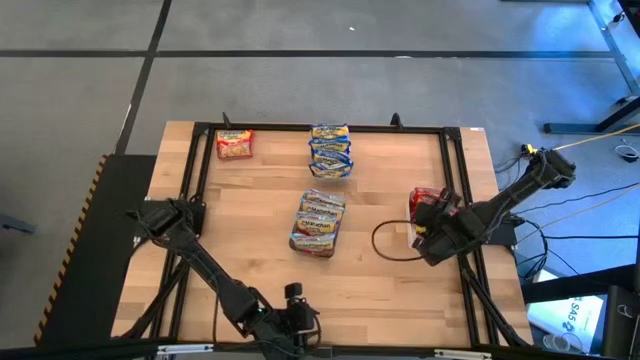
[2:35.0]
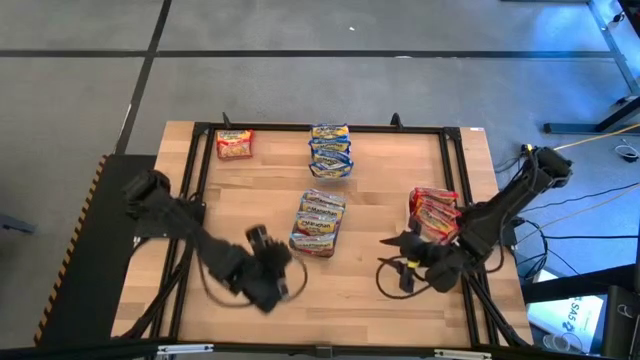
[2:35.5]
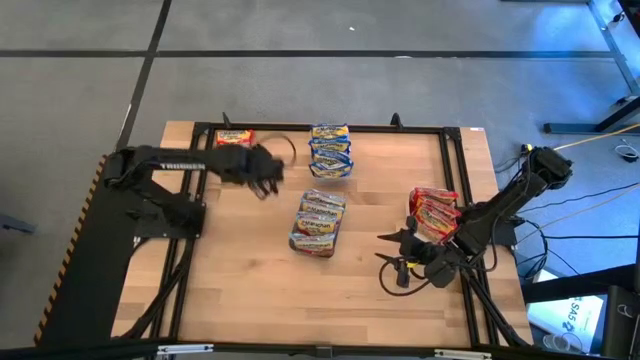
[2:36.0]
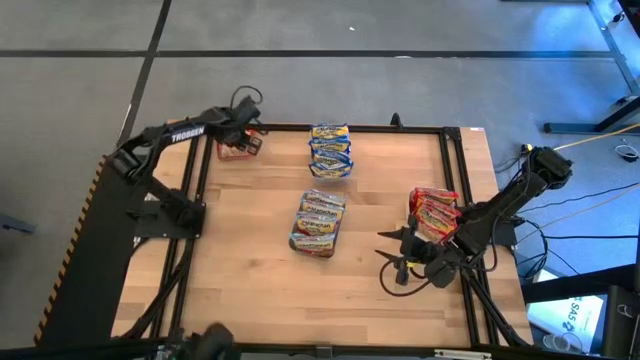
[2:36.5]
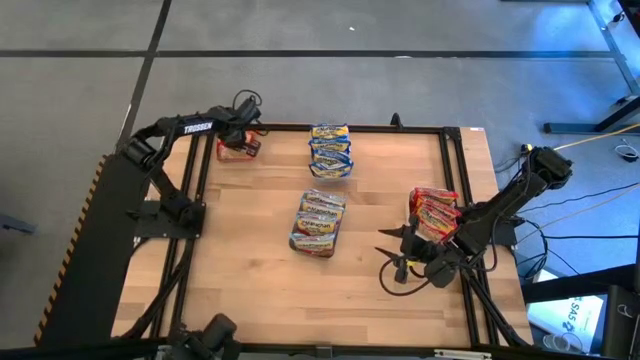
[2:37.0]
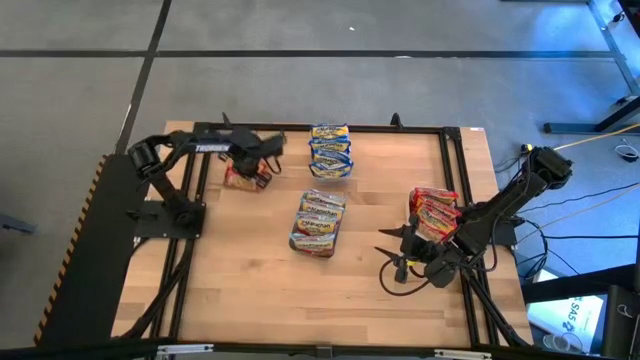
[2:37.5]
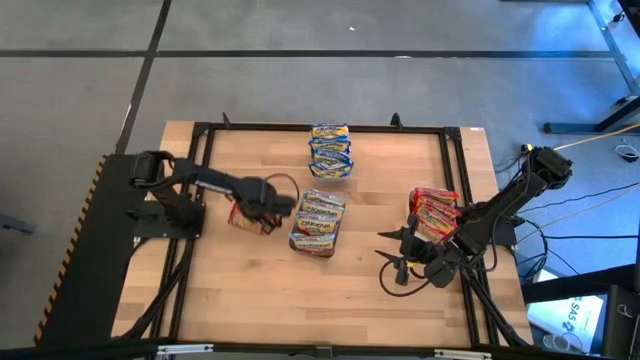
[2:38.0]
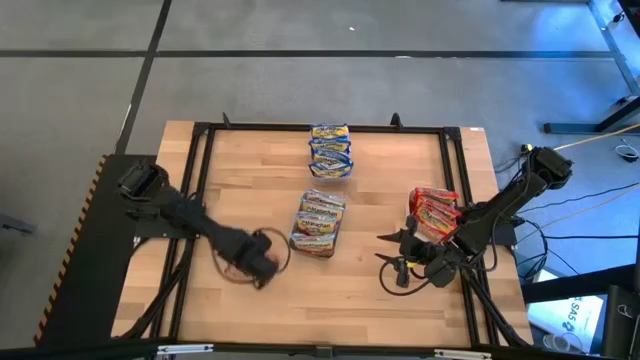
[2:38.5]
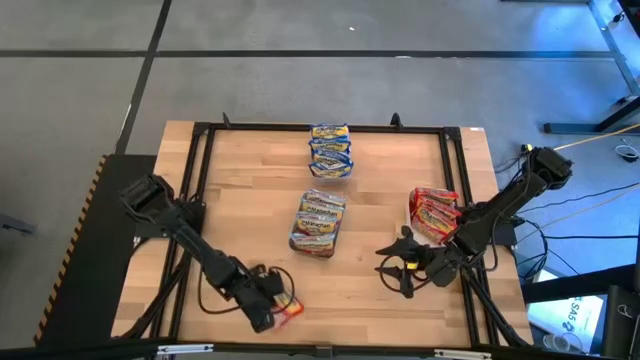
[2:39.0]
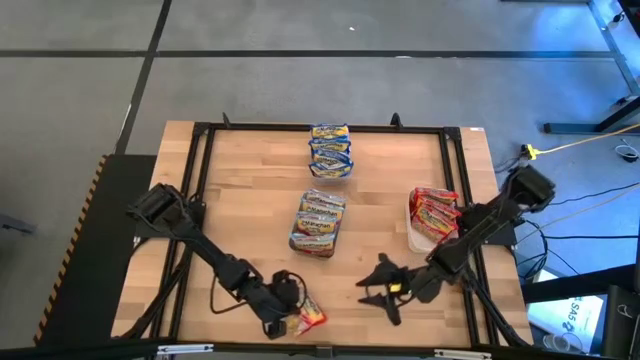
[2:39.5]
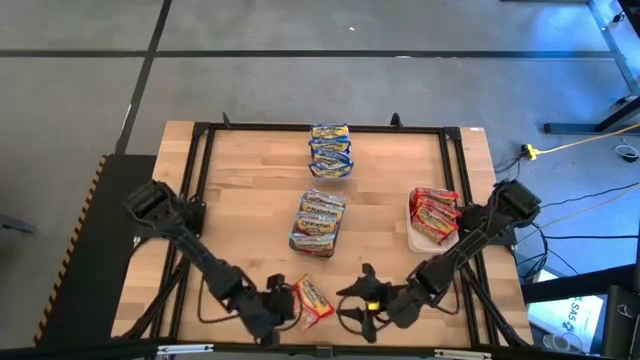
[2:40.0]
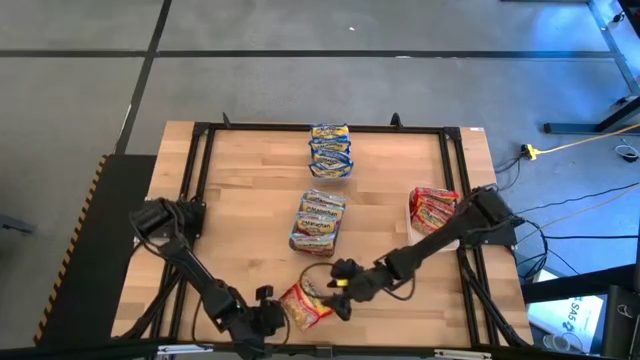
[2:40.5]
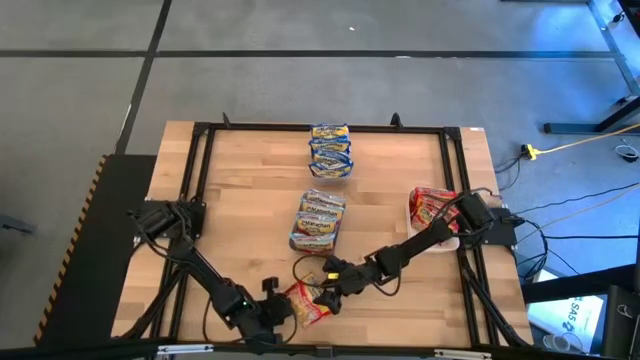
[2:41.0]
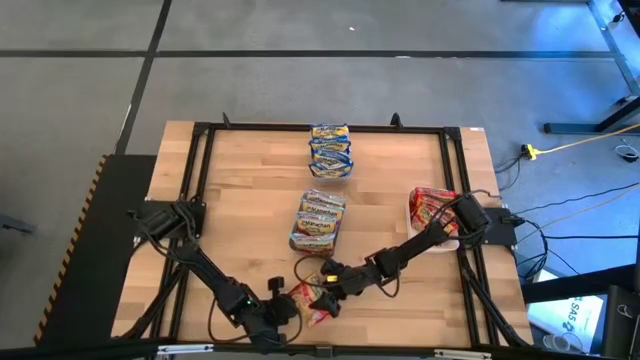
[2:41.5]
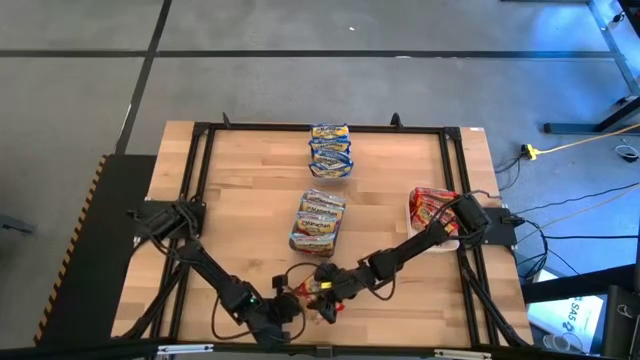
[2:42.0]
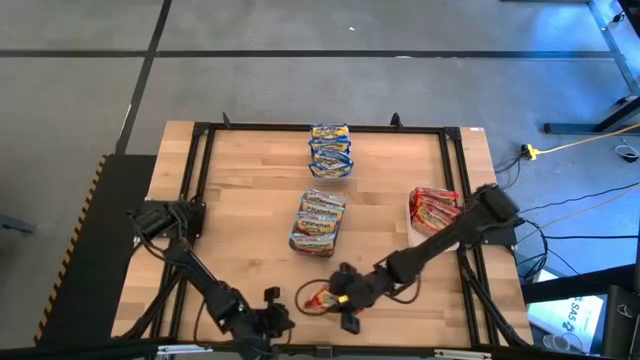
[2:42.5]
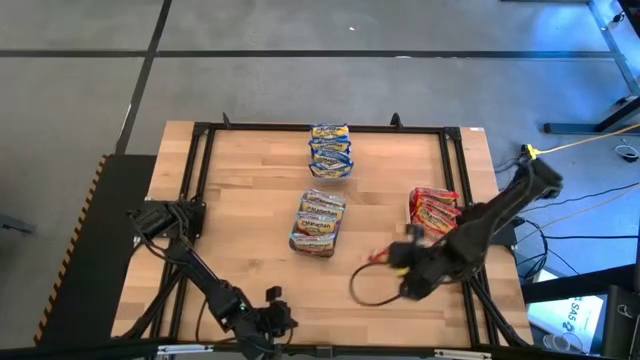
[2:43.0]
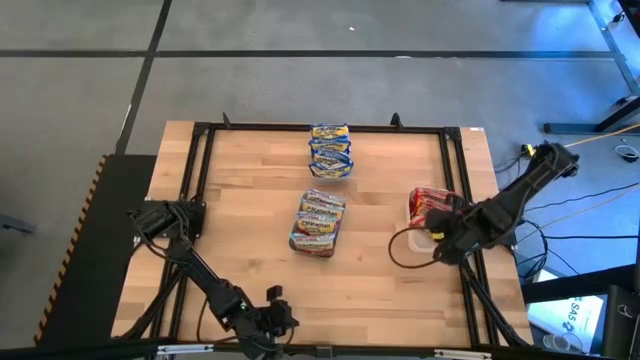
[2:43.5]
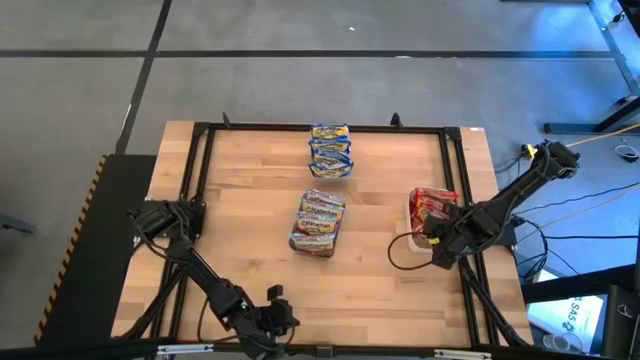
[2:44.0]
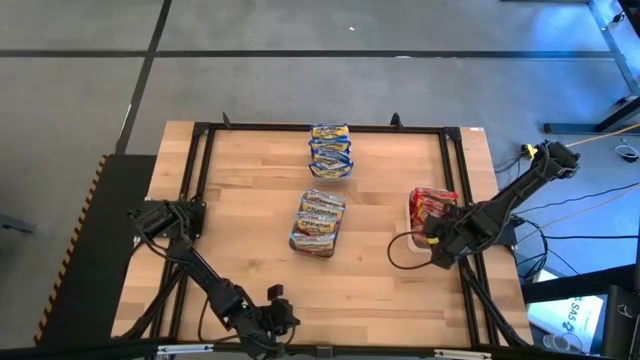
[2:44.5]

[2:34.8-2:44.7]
Task: Sort Maruchan noodles
Put the red noodle pack into the white bin

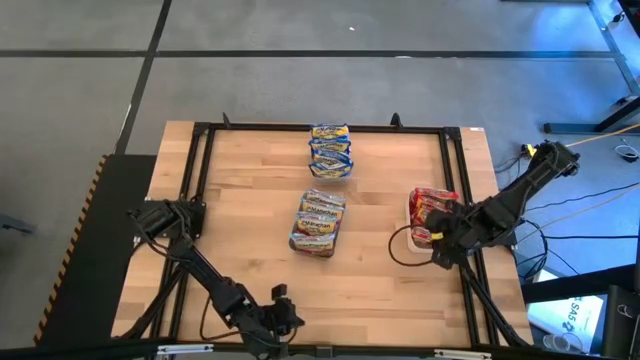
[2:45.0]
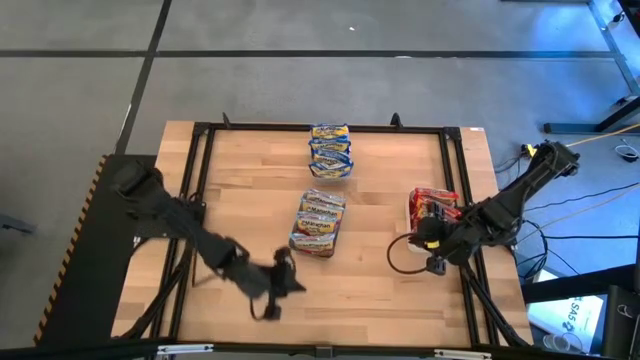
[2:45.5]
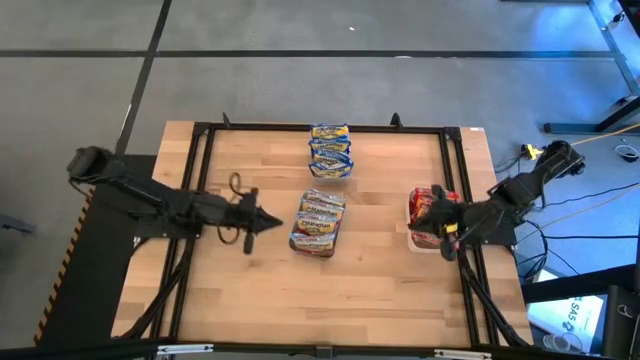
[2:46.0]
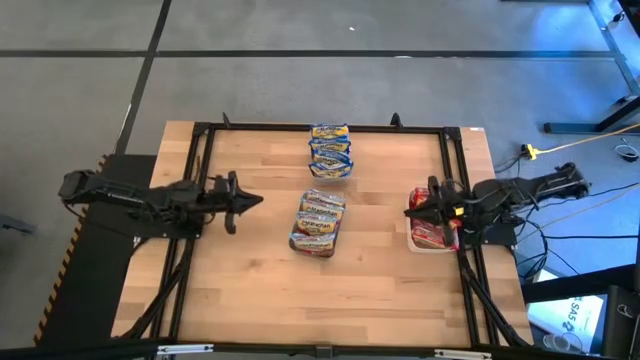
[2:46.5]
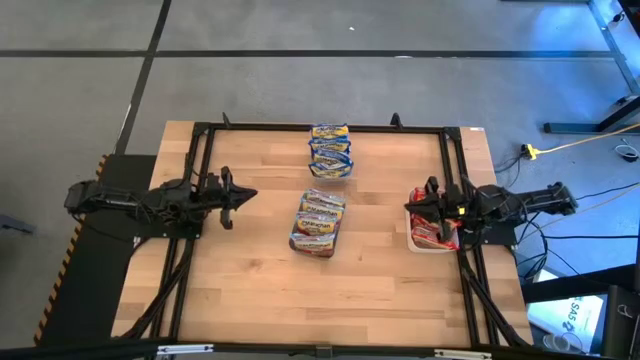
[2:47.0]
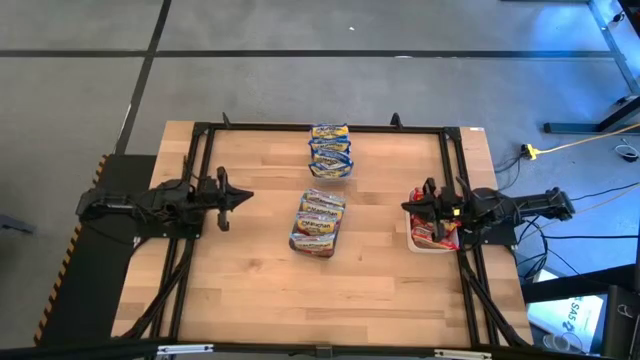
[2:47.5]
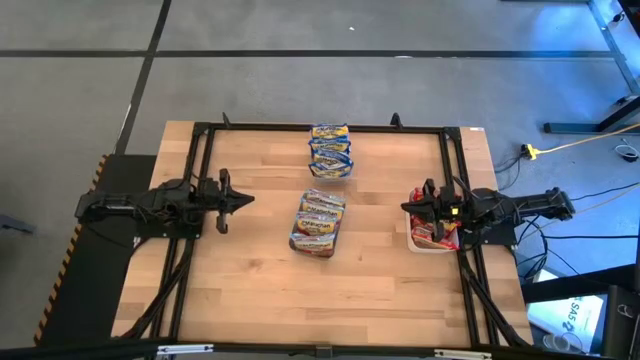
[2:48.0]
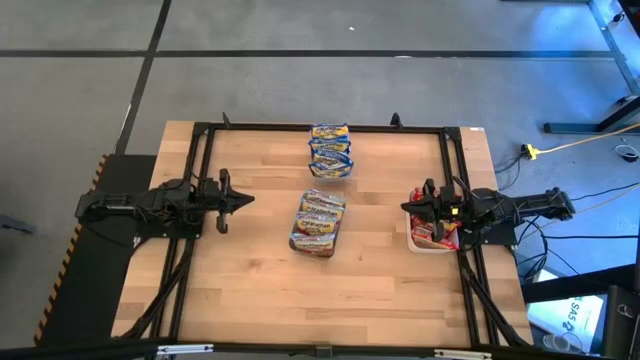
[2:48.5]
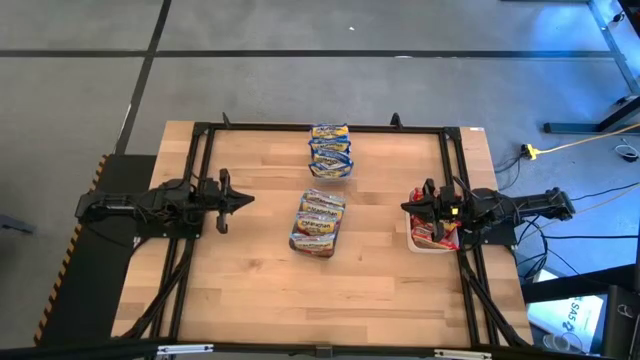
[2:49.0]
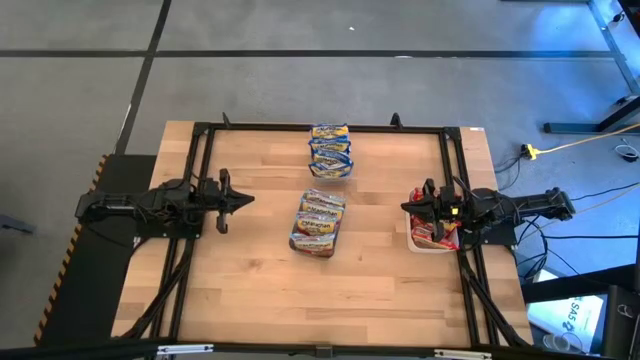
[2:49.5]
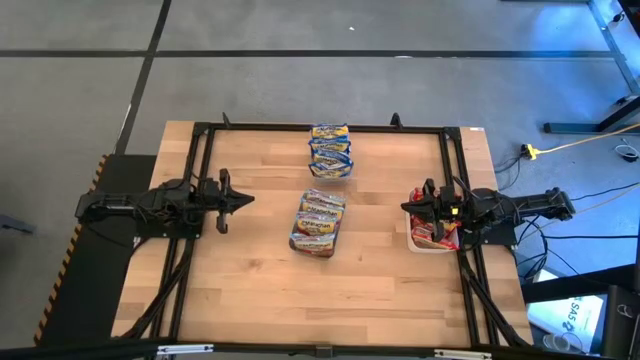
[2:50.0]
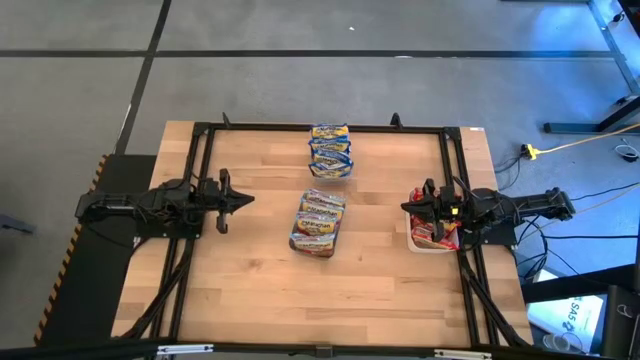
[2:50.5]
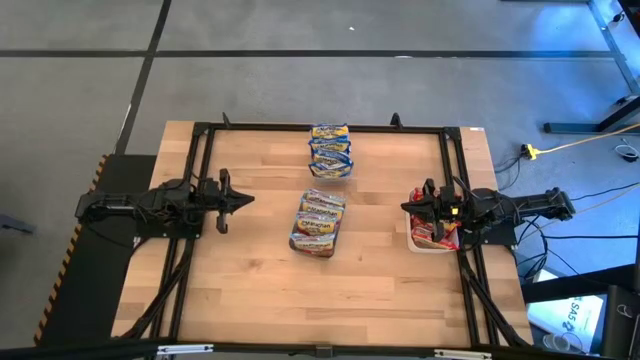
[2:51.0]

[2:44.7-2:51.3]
Return to Home Position

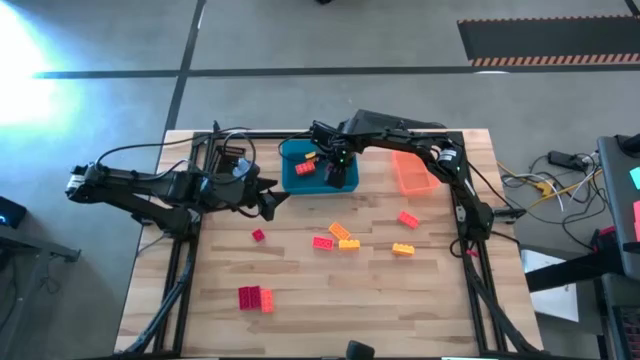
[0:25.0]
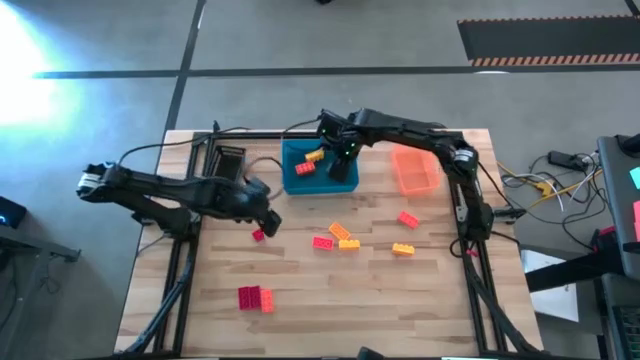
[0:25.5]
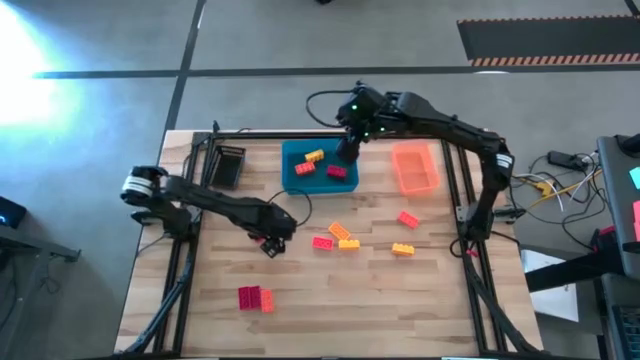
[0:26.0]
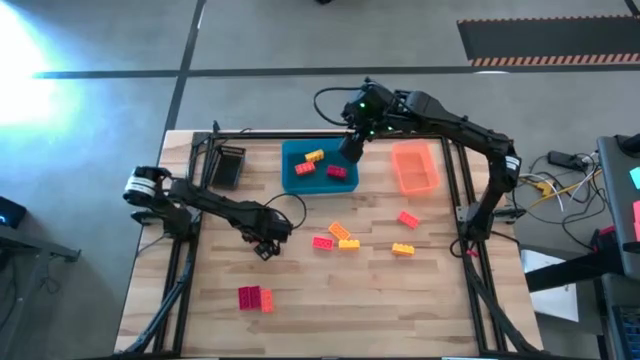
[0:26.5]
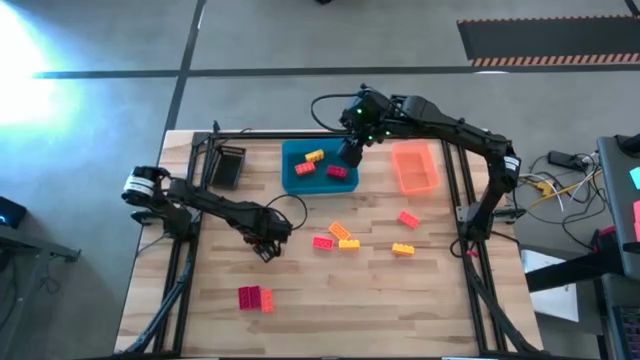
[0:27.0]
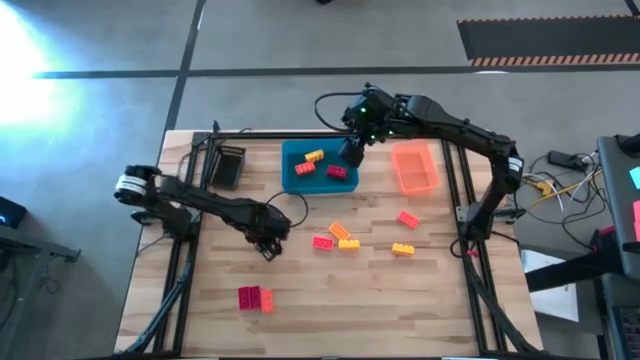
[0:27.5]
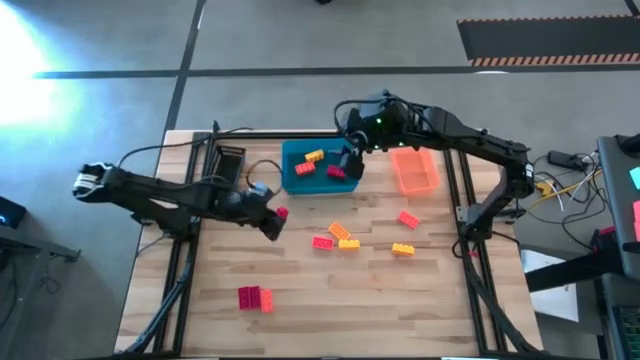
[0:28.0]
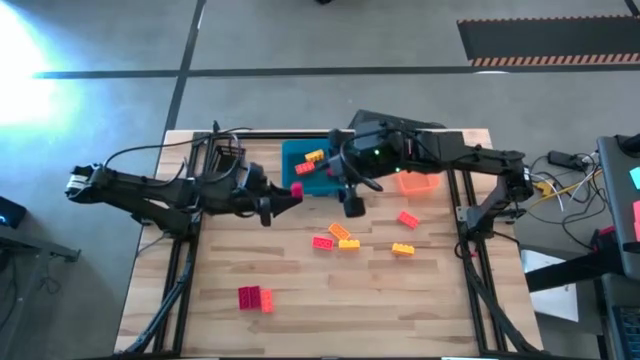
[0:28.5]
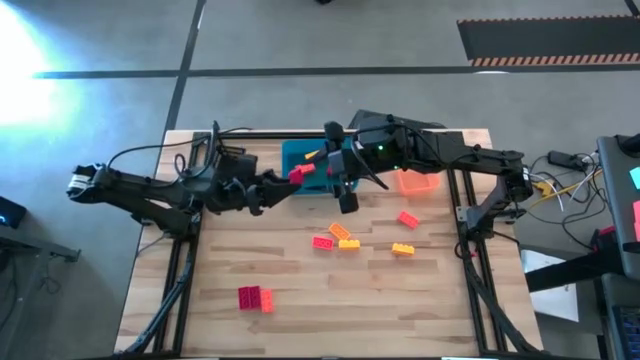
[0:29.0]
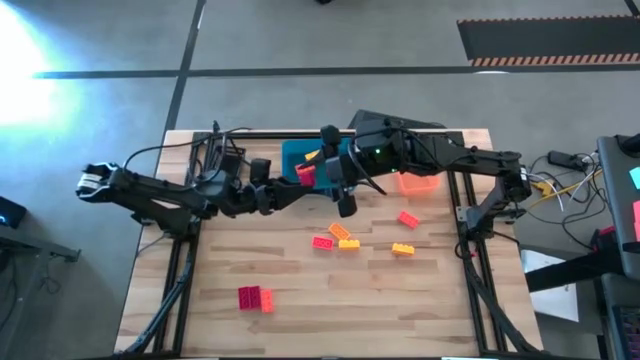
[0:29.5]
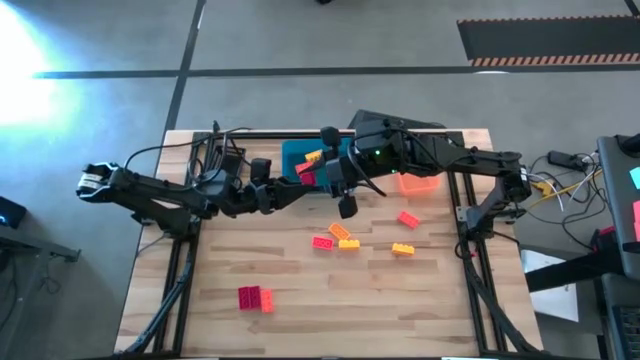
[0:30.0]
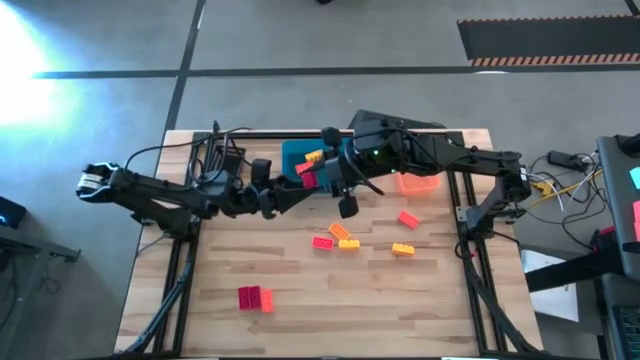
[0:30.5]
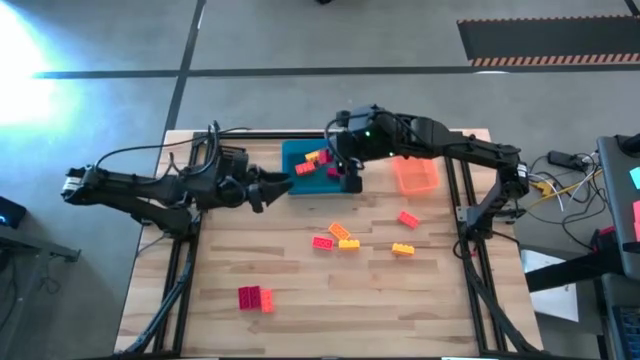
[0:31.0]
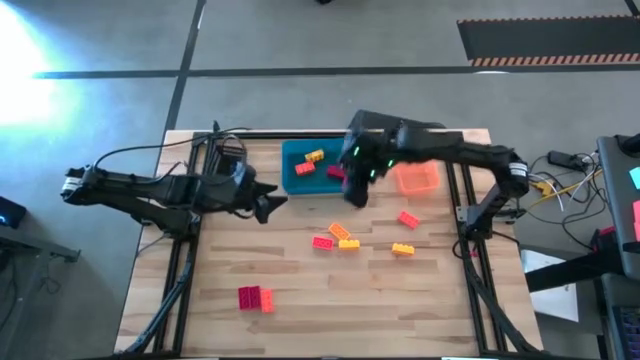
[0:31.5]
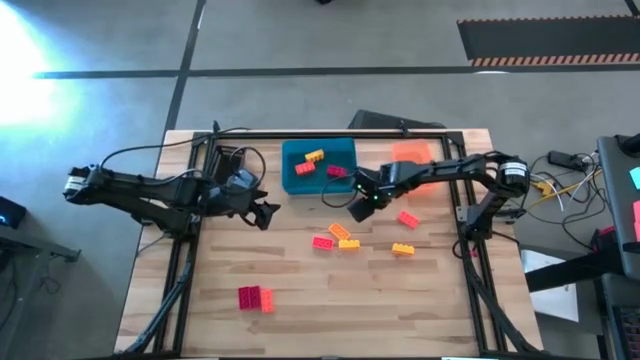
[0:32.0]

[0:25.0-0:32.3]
Task: Sort & place blocks by color
Move the red game piece to the center of the table
